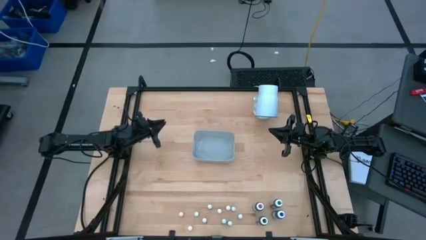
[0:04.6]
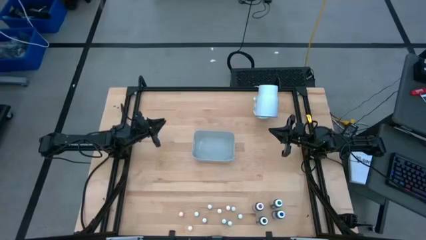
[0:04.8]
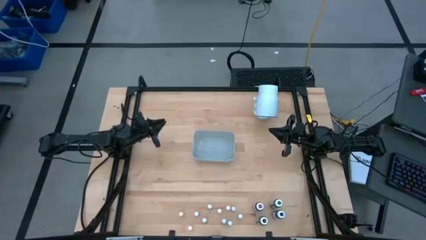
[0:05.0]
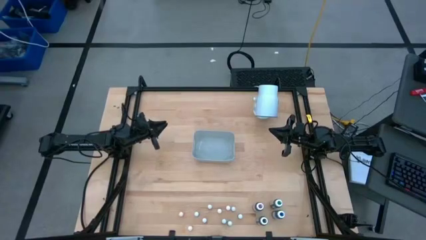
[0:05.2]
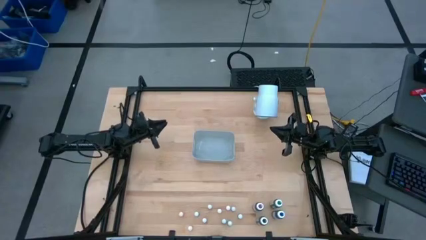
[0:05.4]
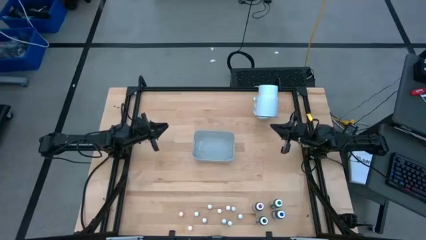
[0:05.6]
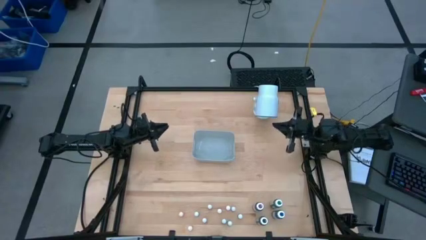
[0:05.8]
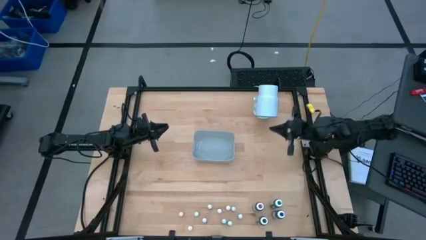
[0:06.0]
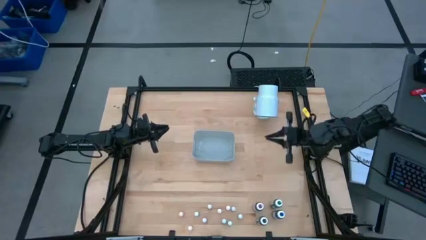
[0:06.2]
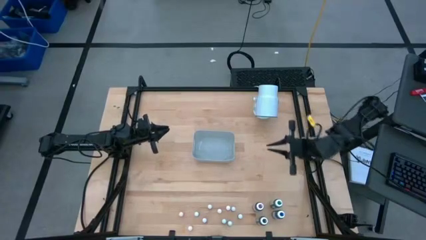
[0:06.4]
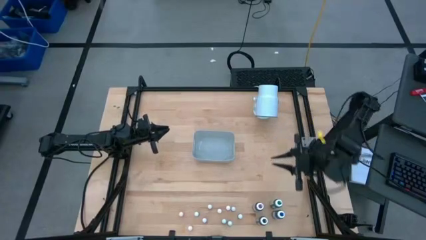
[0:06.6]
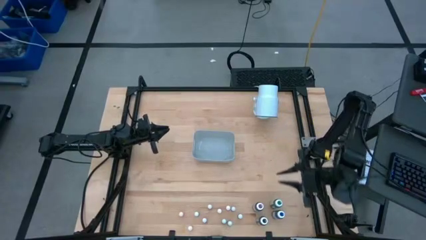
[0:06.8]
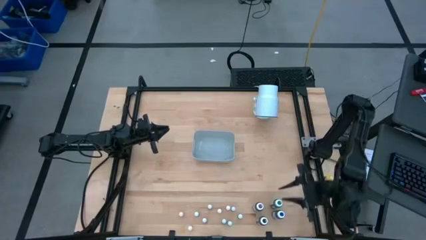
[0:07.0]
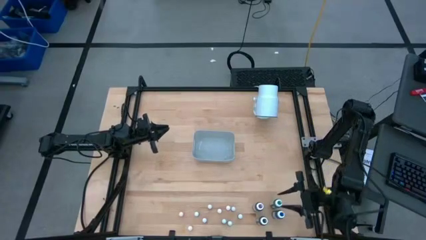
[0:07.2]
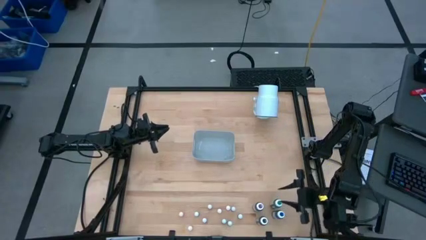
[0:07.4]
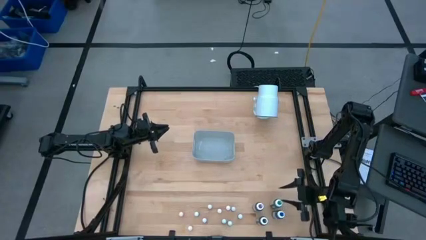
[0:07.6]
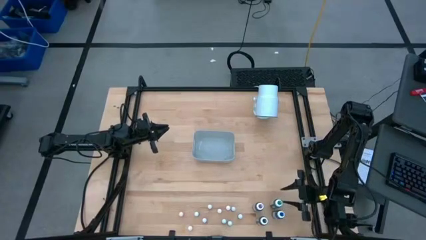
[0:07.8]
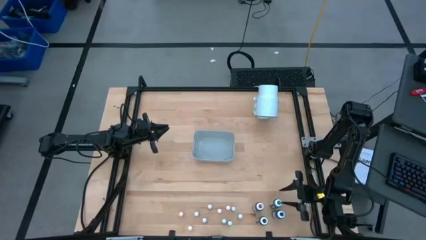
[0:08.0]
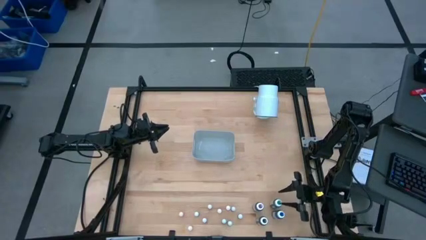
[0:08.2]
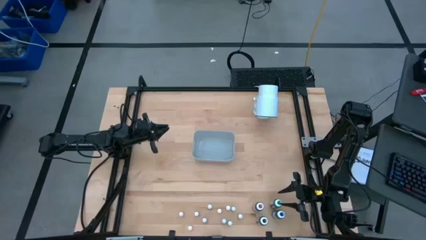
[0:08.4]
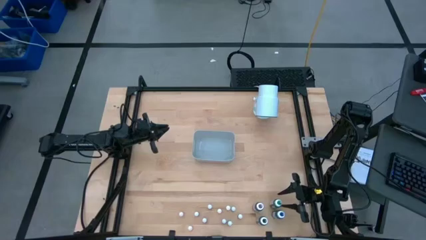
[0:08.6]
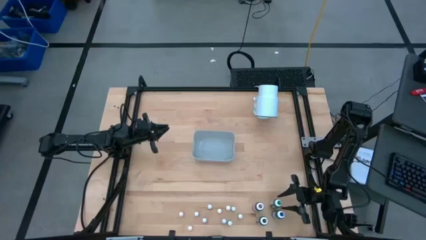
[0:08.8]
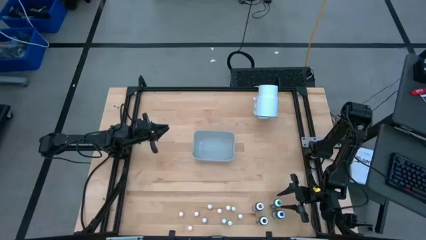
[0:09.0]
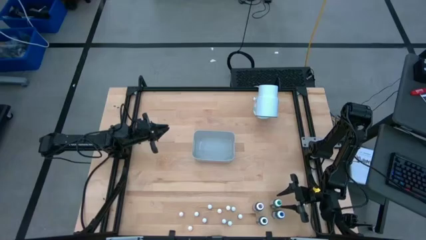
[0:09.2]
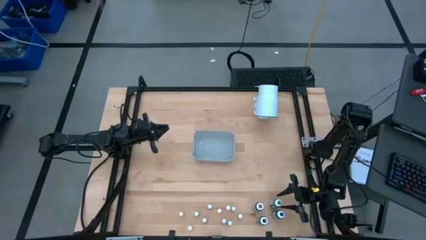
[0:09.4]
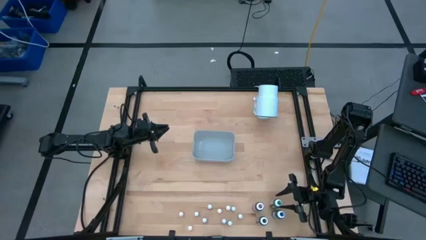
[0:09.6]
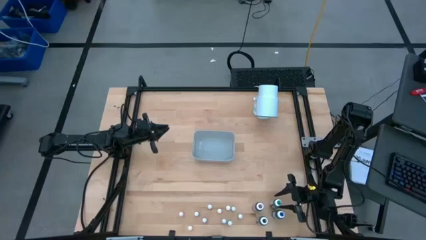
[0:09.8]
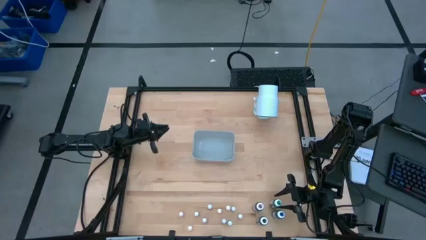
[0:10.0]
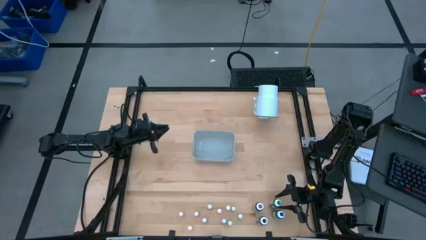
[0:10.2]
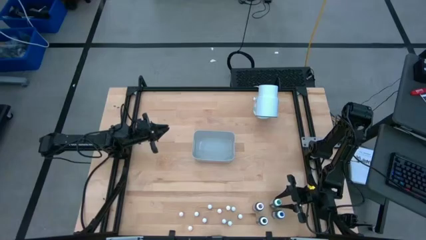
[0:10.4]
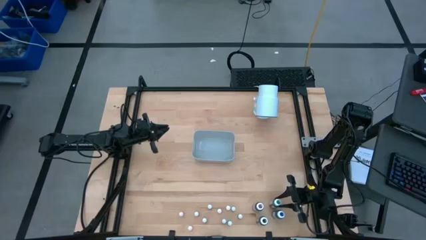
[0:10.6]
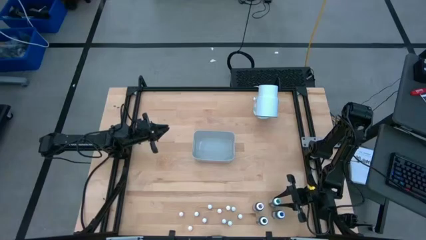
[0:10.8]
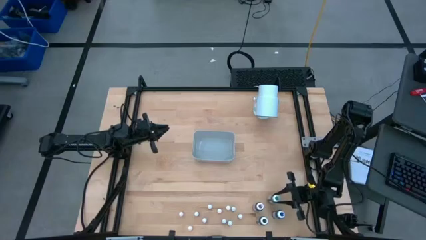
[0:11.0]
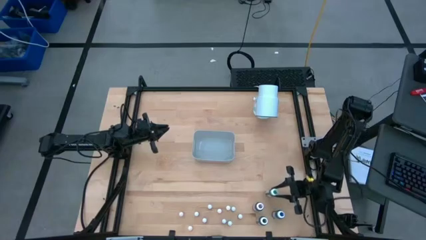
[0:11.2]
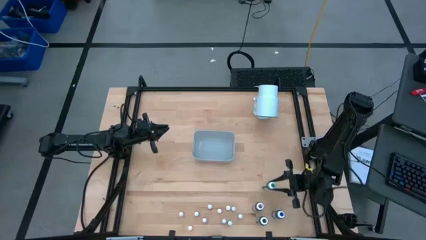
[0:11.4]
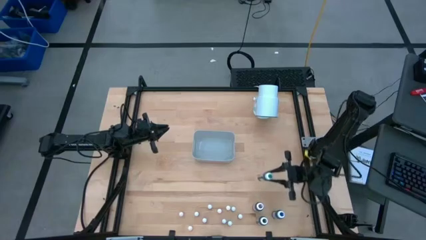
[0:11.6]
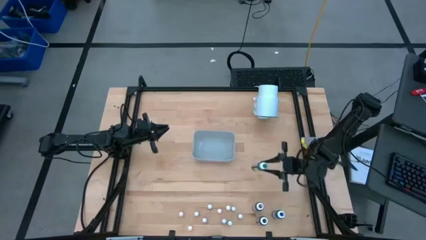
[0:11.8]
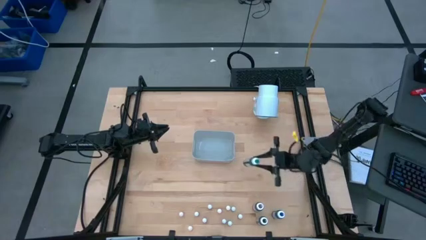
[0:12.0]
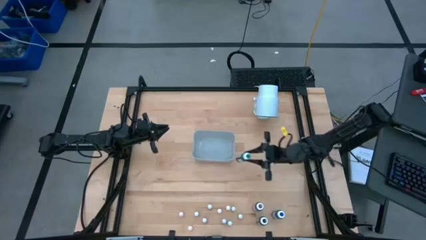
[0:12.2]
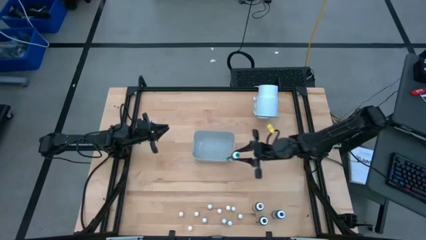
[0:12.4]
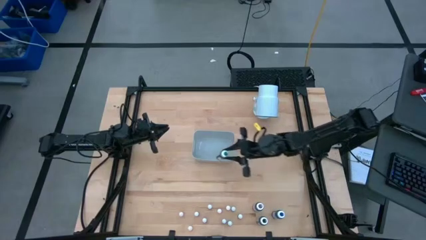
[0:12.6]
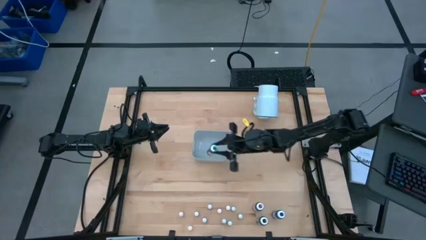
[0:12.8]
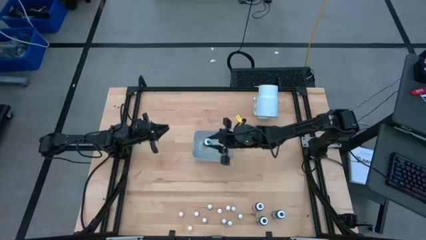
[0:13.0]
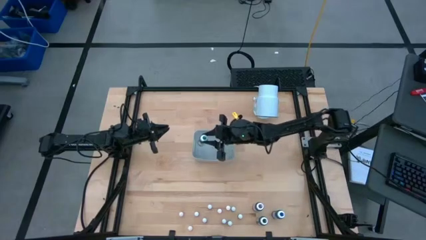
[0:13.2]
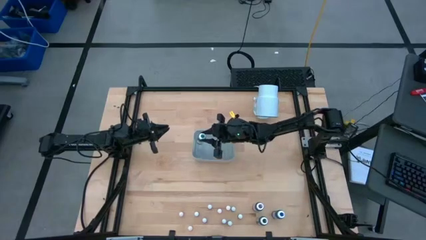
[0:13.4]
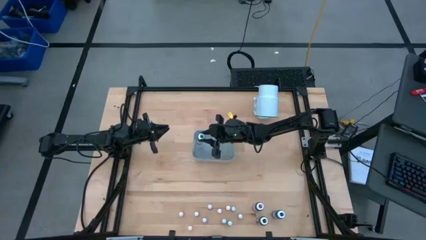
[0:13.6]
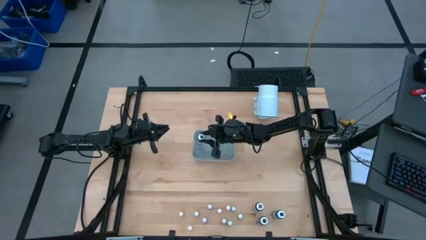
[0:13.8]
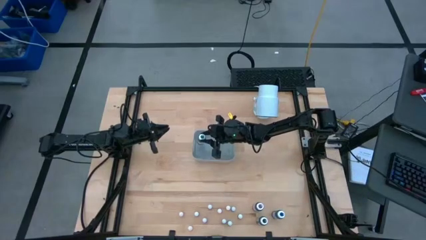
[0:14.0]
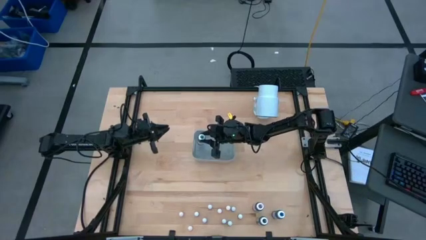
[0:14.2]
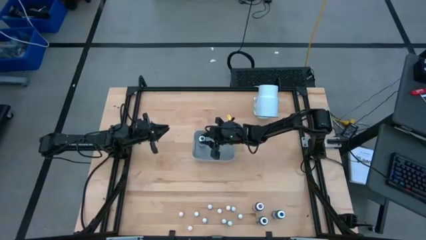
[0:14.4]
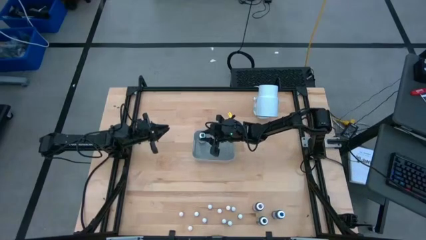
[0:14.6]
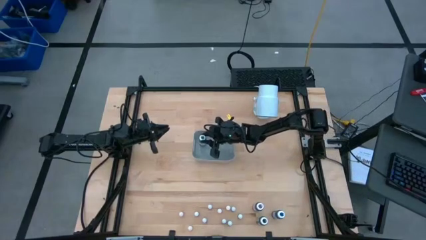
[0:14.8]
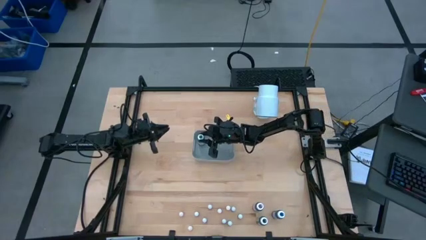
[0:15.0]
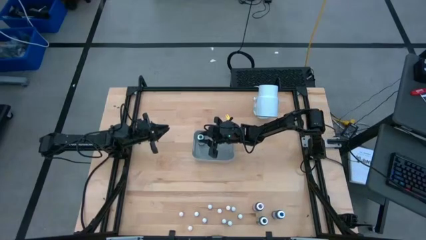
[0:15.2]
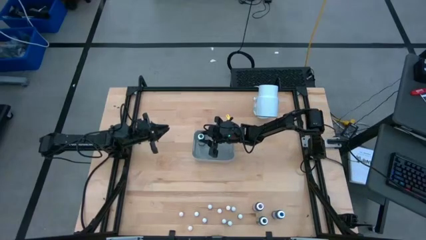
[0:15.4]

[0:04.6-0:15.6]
Task: Pick & Place food coloring
Put the big green food coloring bottle into the gray bin

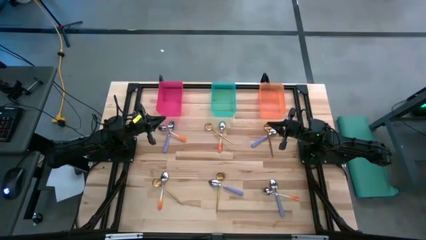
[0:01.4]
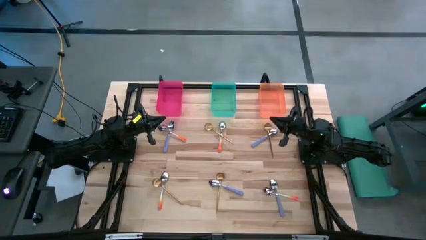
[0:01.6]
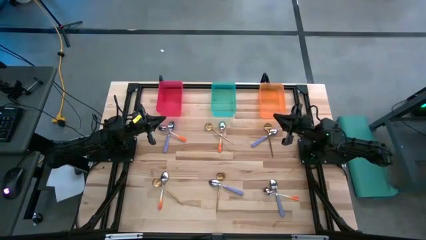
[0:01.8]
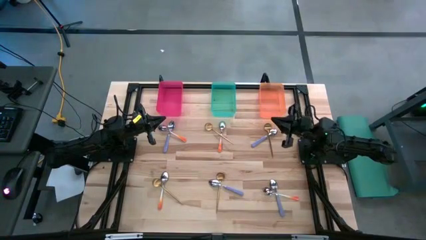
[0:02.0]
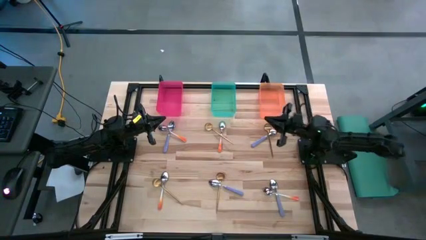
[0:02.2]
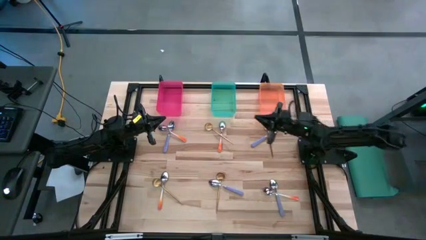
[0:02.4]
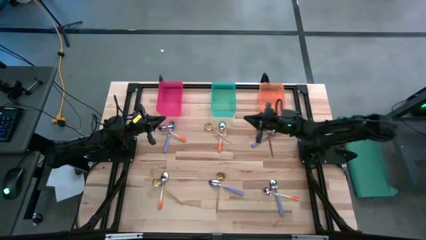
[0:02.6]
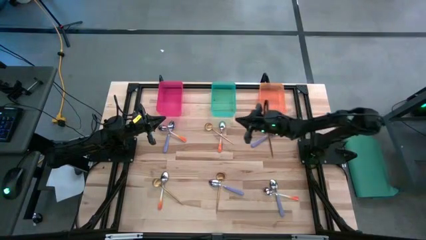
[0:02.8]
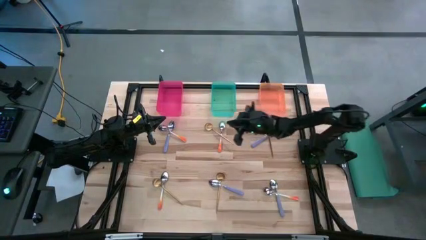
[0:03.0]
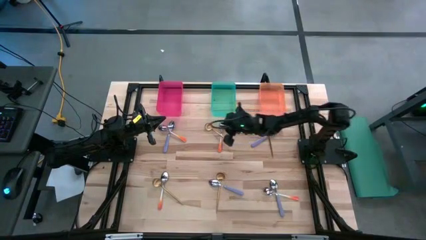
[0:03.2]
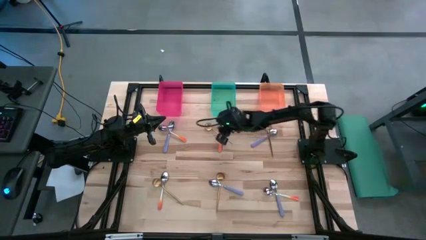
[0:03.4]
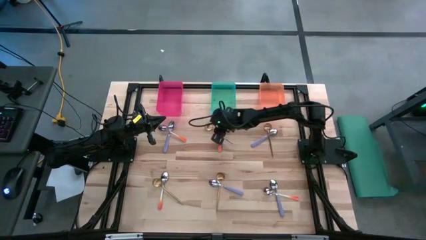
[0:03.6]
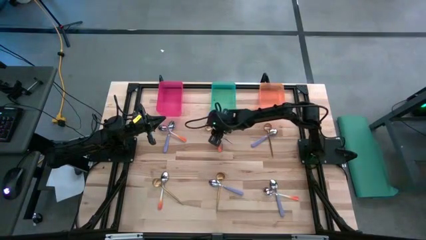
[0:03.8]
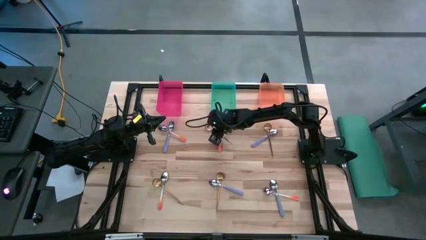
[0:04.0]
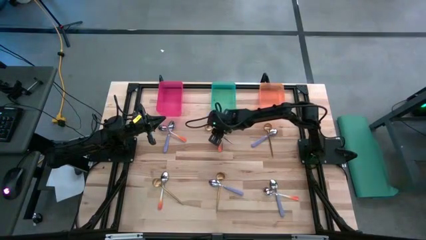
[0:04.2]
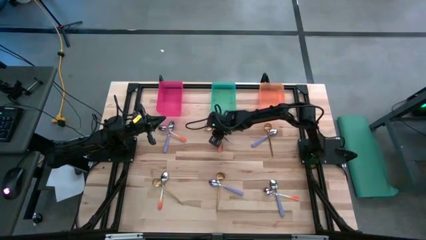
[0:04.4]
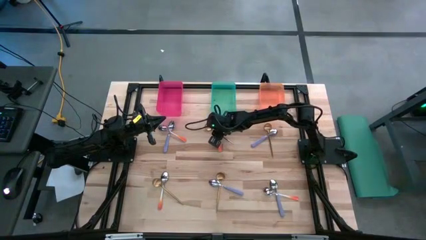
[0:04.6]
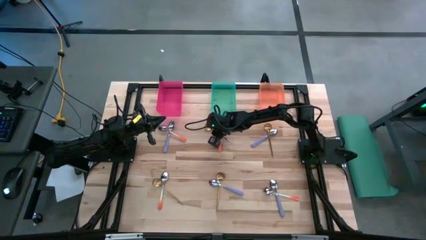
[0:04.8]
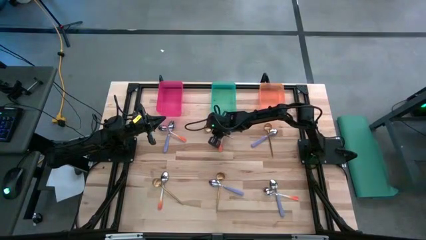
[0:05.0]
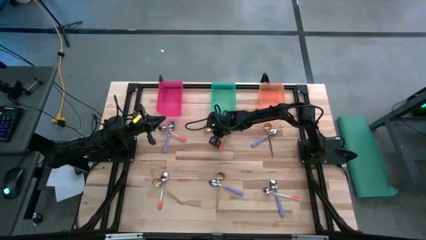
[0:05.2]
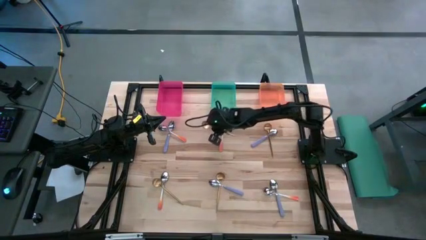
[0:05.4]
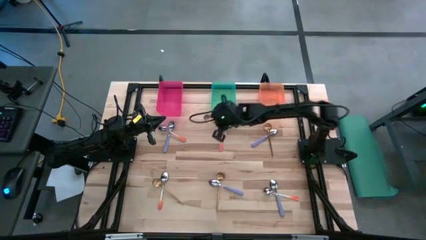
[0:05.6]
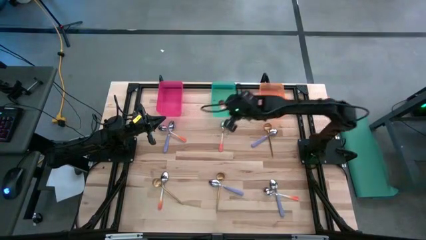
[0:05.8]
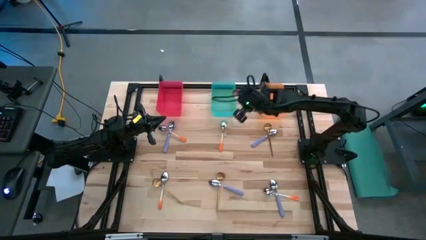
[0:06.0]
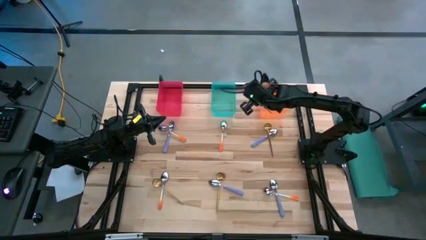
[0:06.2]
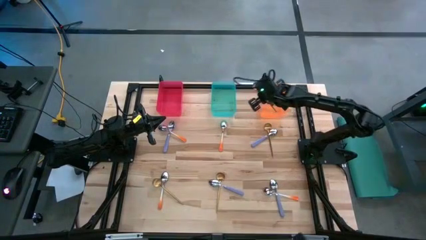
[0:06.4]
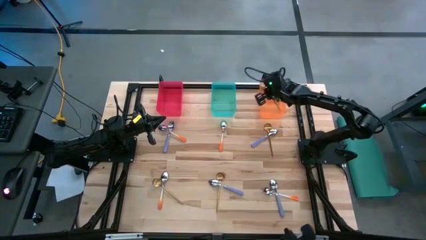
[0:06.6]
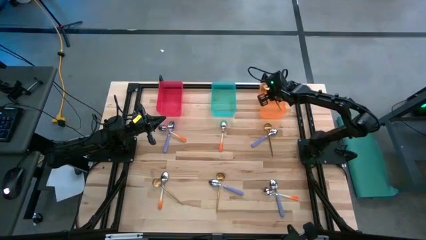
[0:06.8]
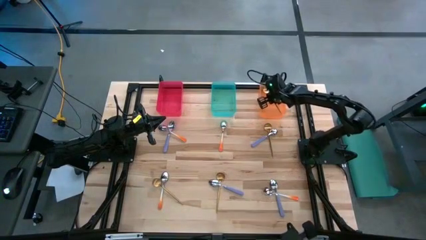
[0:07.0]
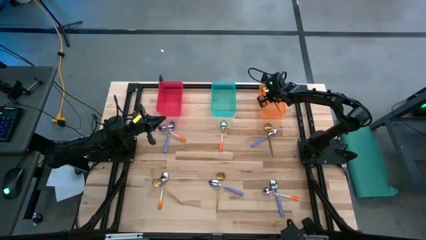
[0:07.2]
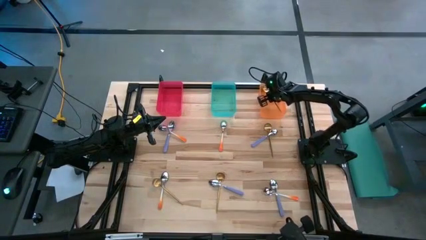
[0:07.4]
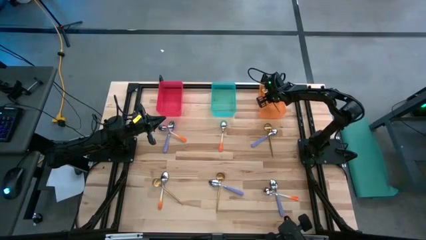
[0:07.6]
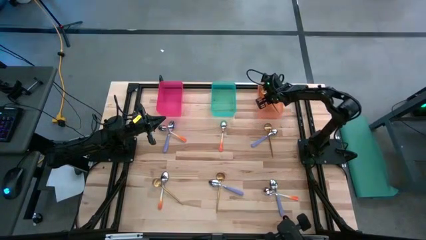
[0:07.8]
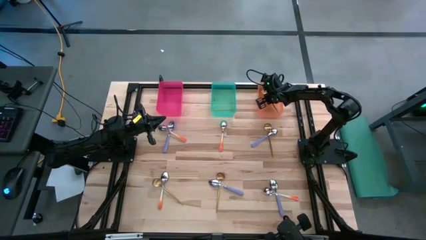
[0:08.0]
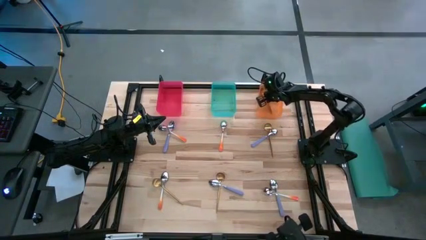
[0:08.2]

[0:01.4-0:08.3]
Task: Sort silverware by color (type)
Put the gold spoon into the orange bin
